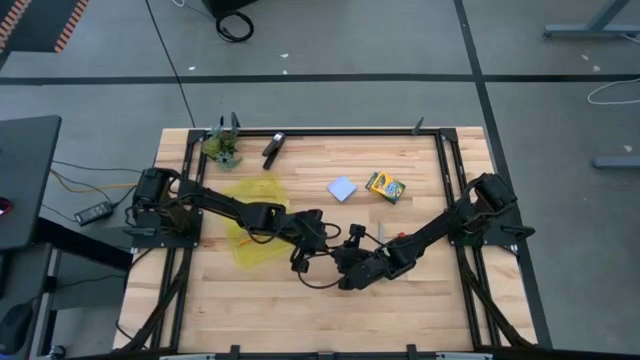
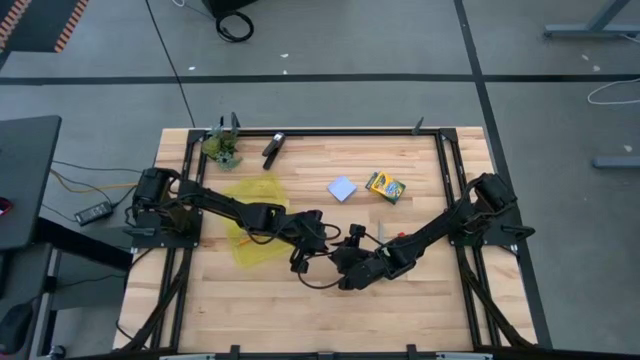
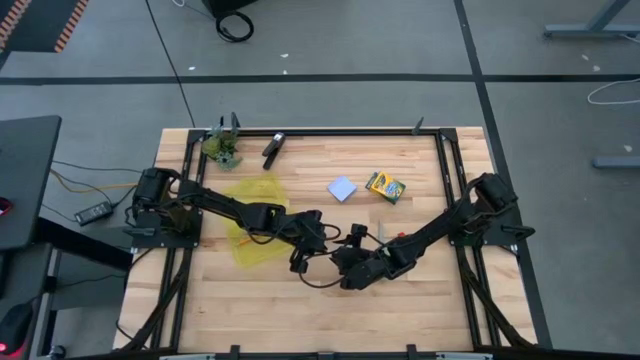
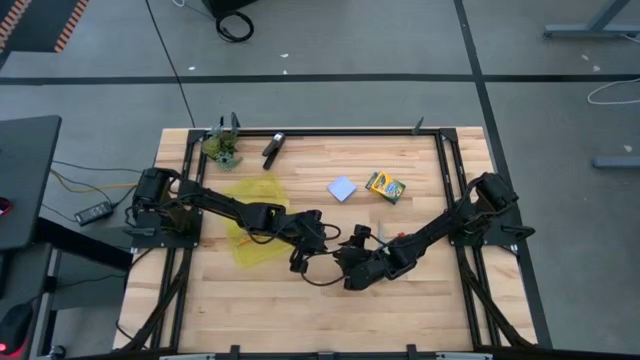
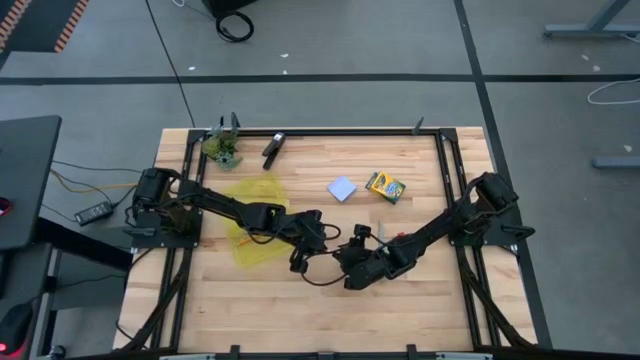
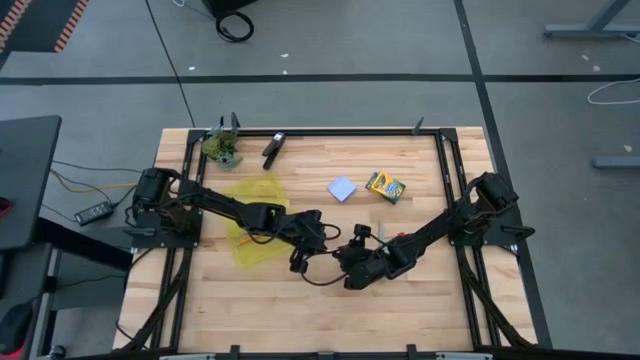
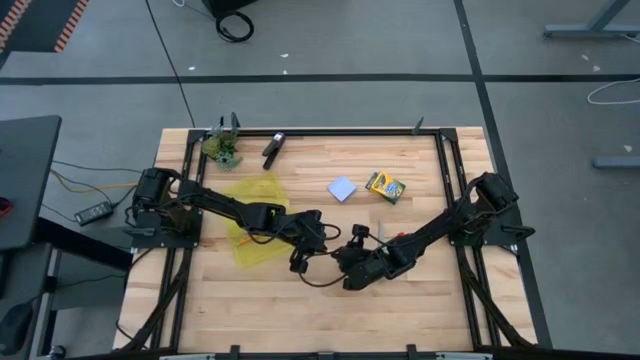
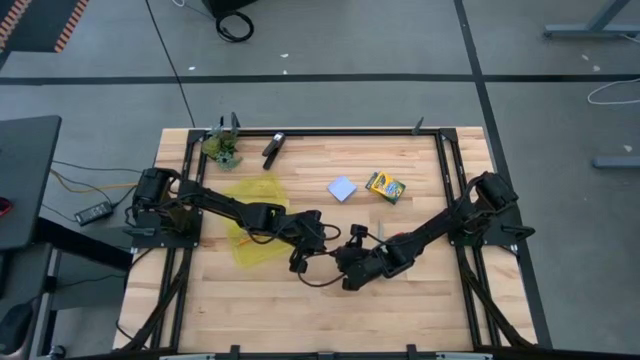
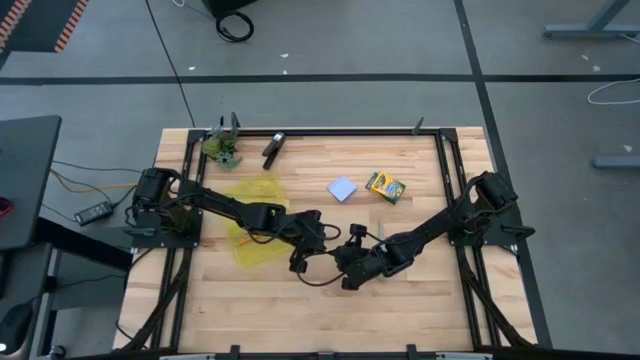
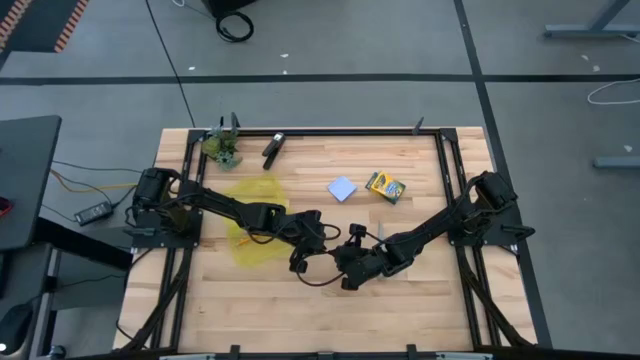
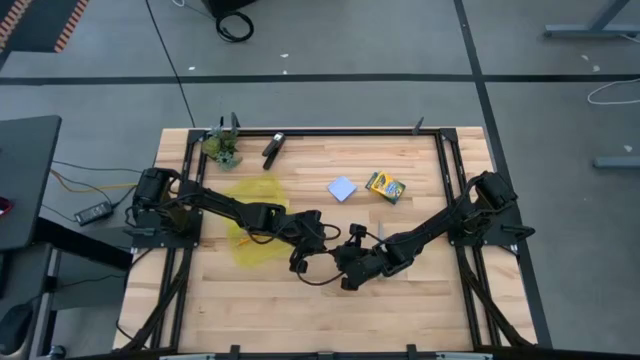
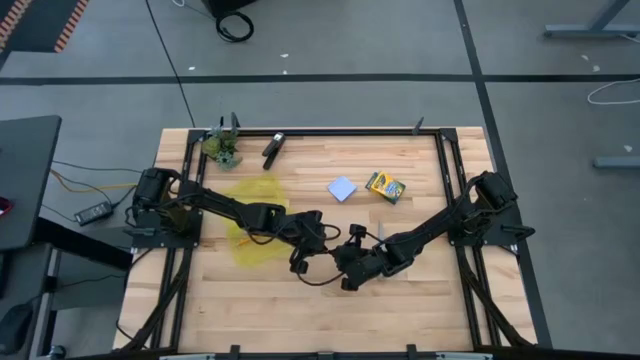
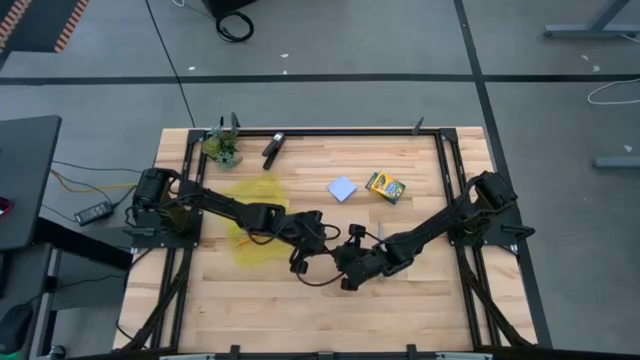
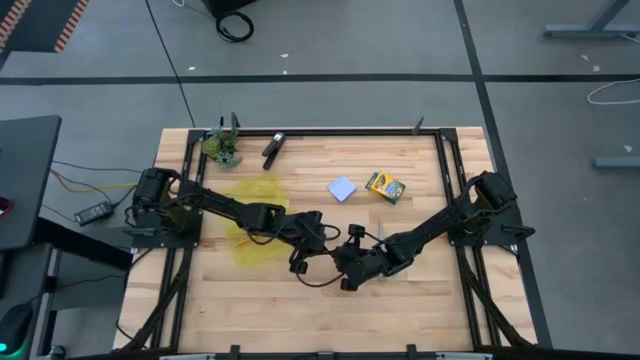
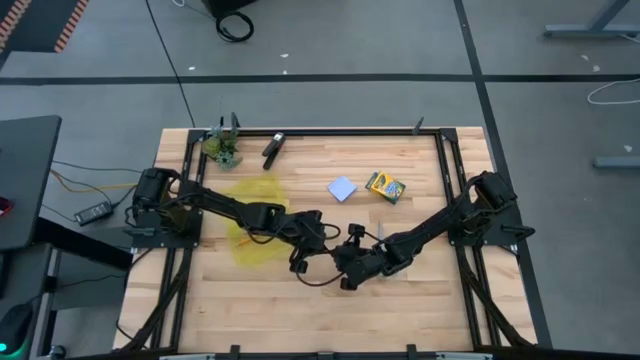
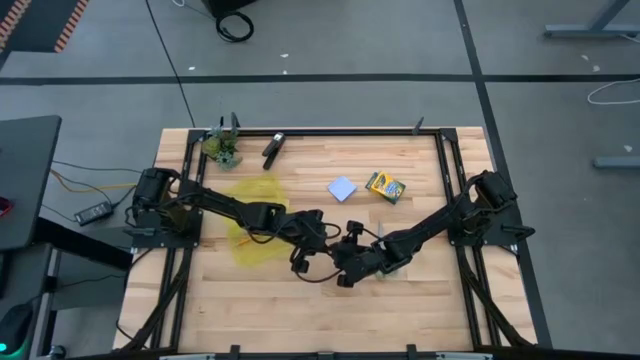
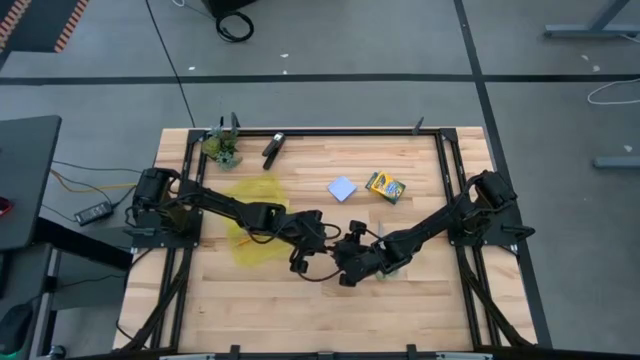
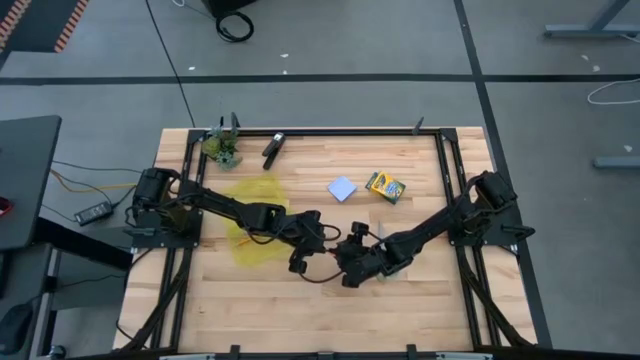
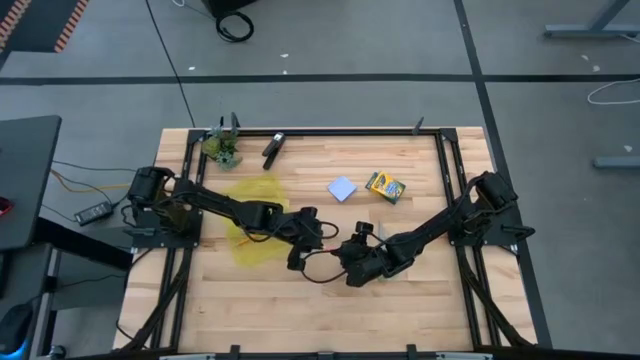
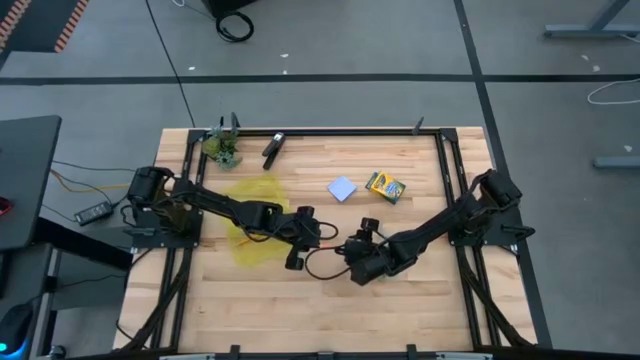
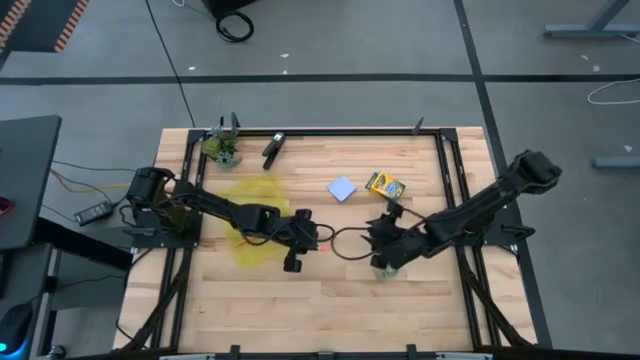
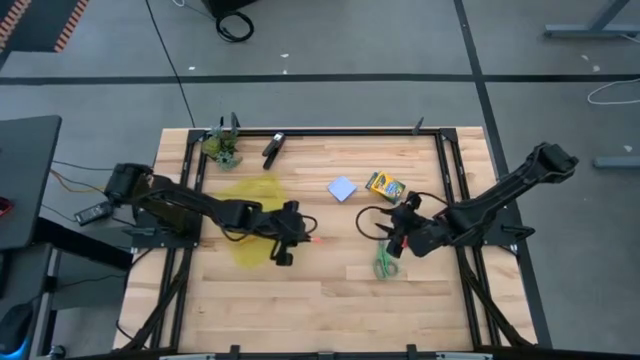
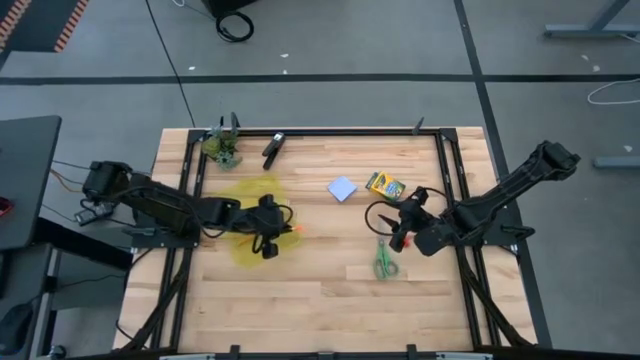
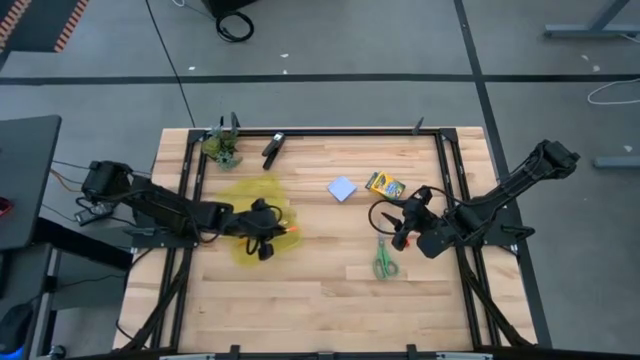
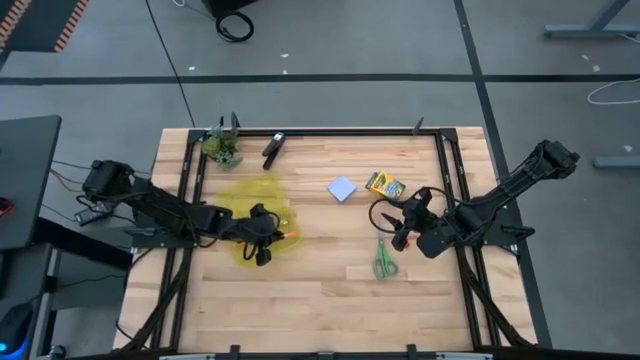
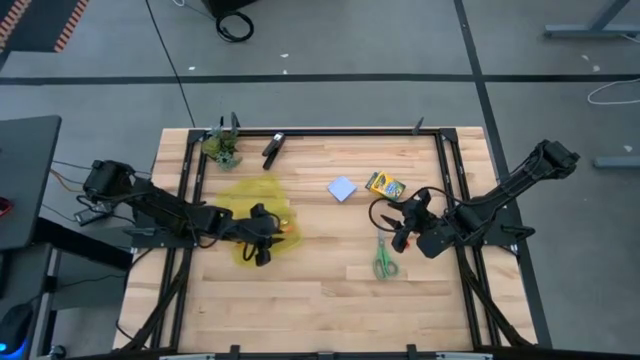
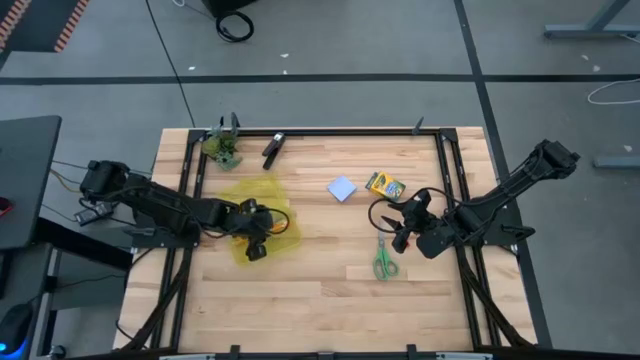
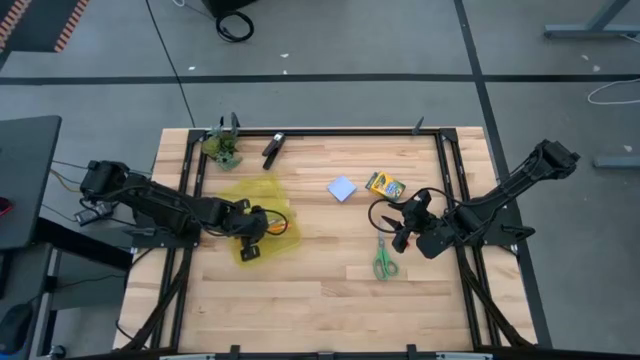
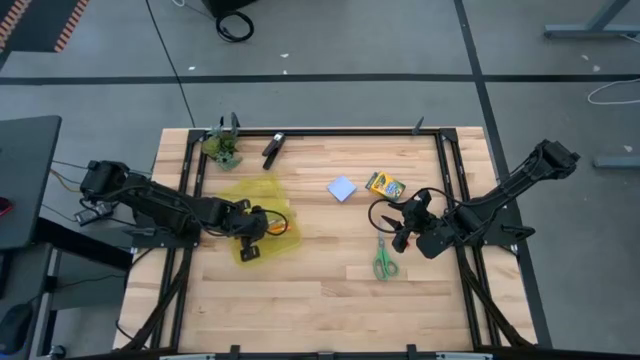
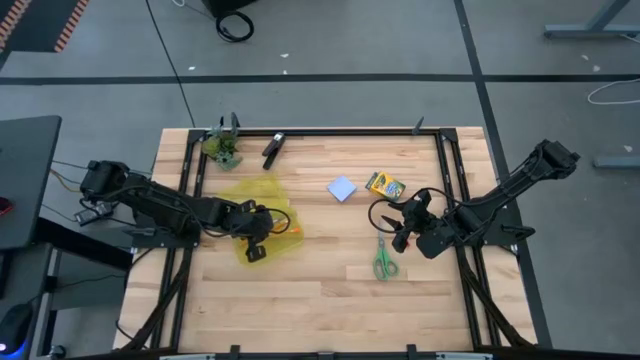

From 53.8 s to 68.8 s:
Task: Pack school essentials
Put the orange pencil into the yellow supply box

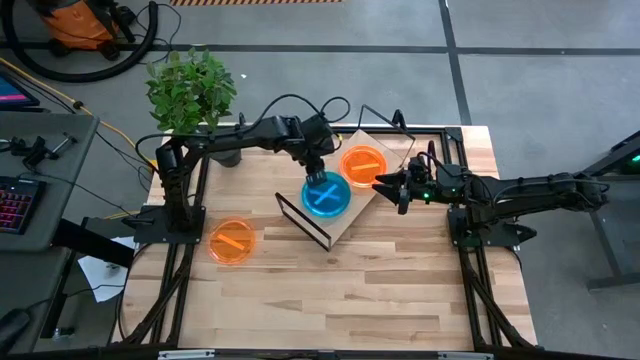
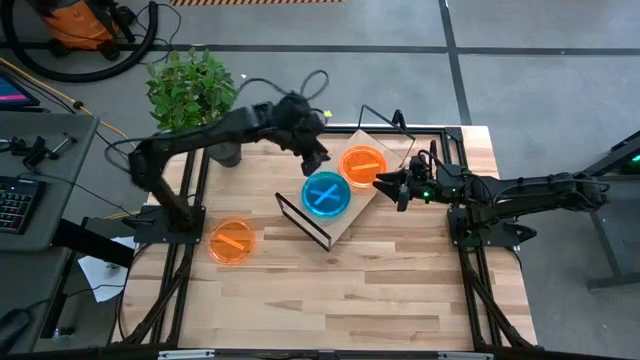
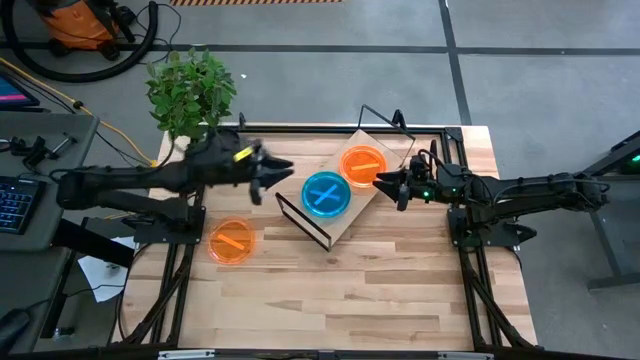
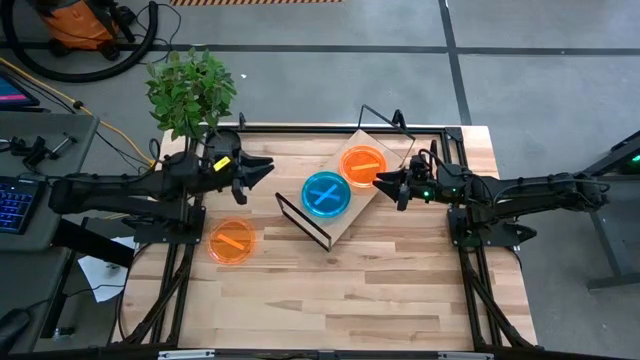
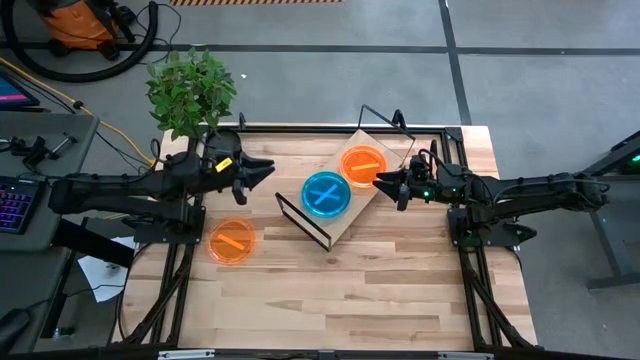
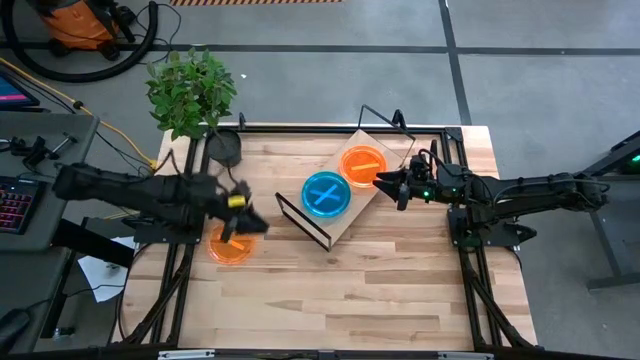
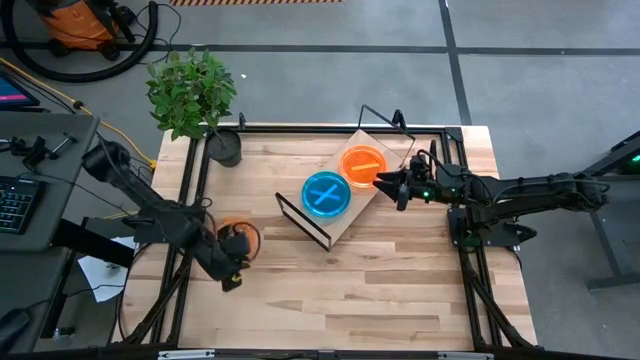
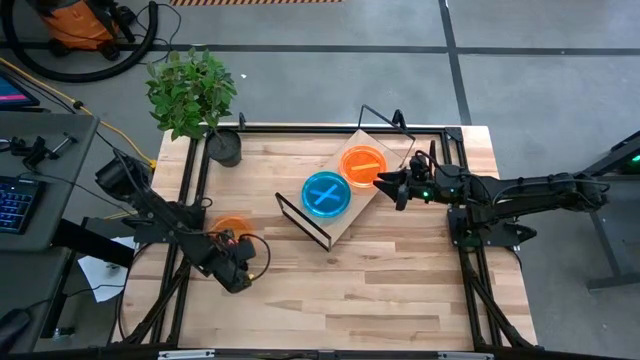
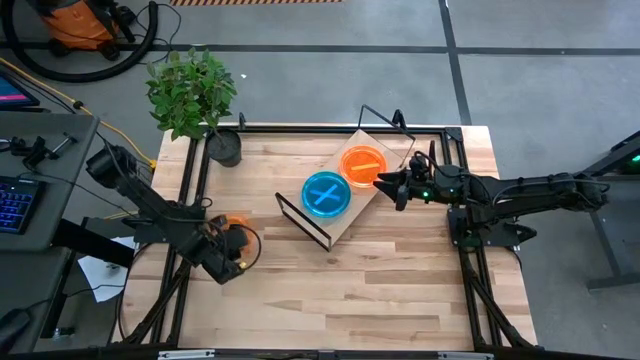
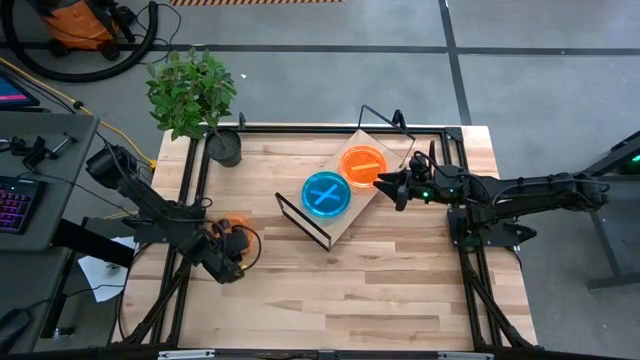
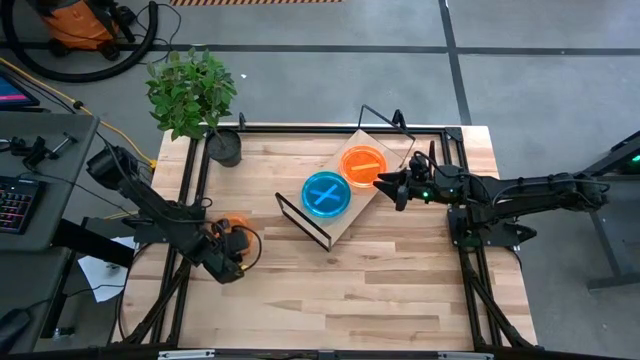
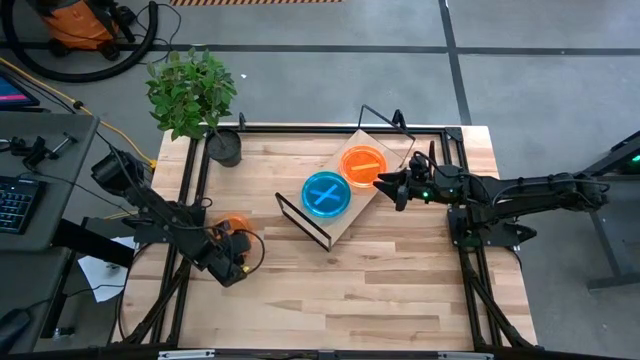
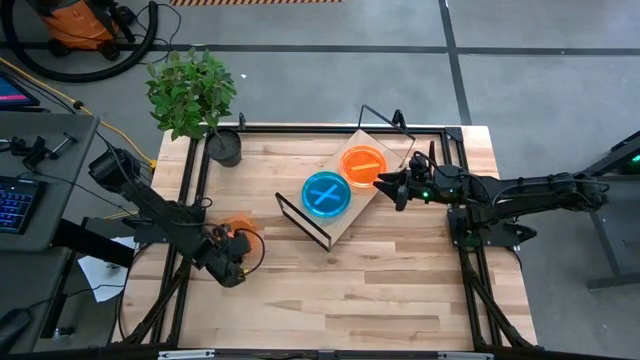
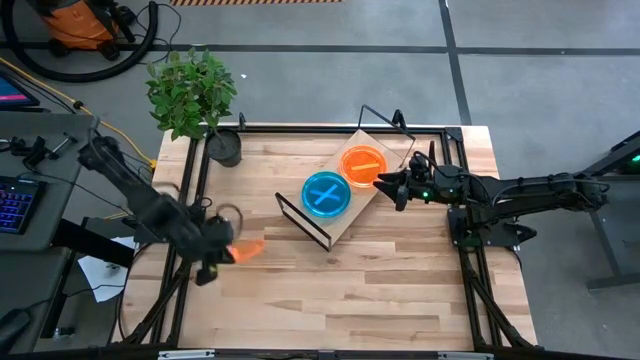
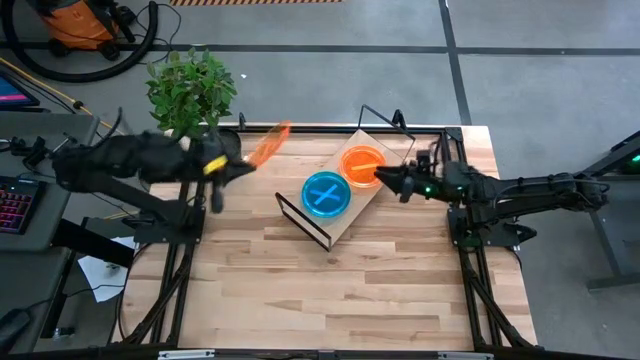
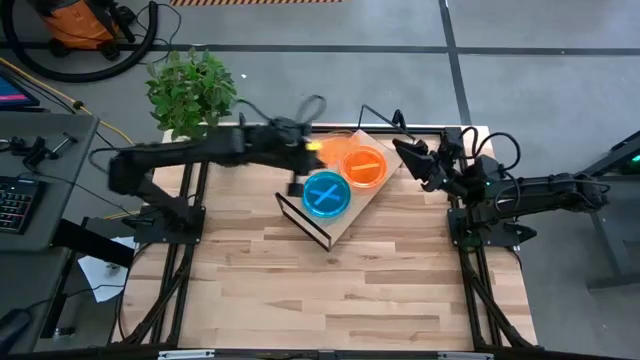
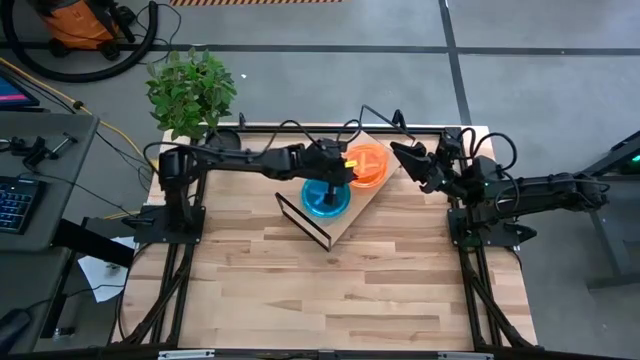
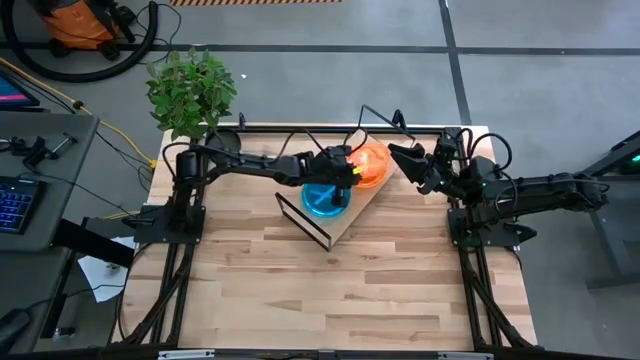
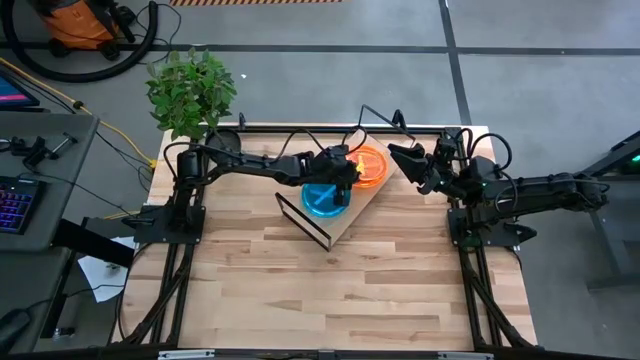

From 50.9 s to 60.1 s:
Task: Place and stack plates onto a shelf
Stack the orange plate on top of the orange plate on the shelf
